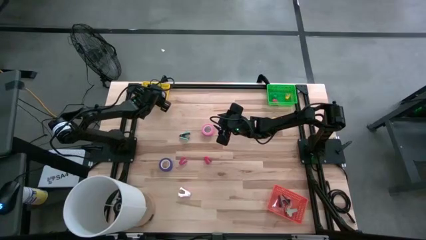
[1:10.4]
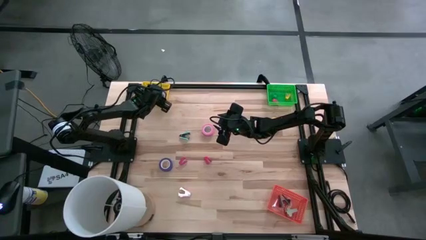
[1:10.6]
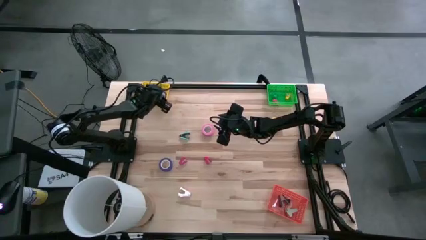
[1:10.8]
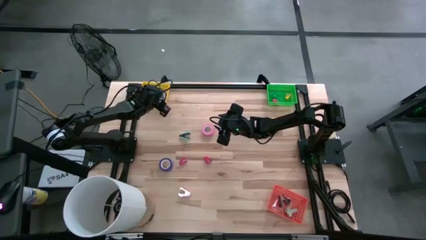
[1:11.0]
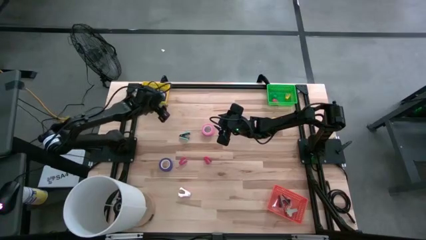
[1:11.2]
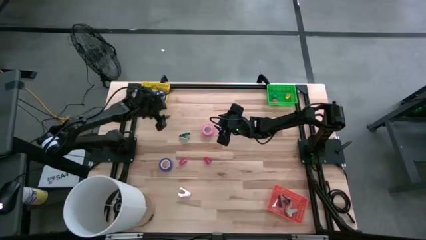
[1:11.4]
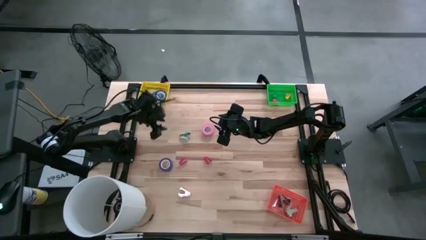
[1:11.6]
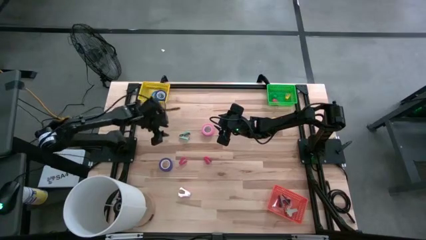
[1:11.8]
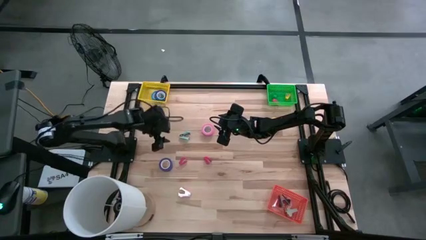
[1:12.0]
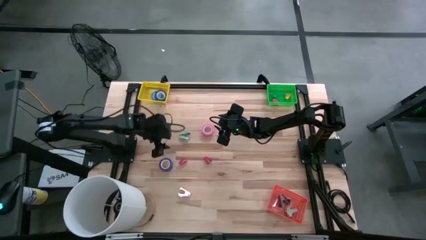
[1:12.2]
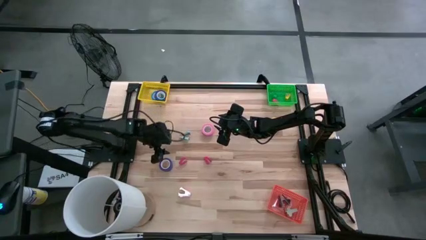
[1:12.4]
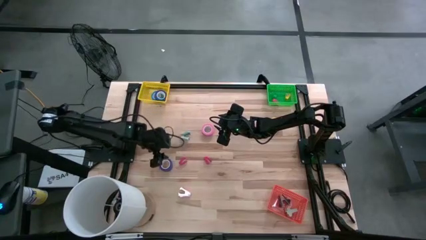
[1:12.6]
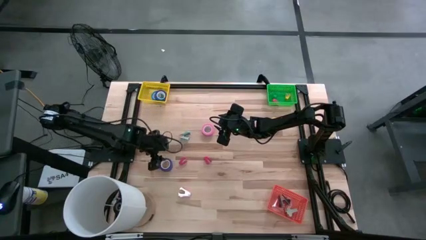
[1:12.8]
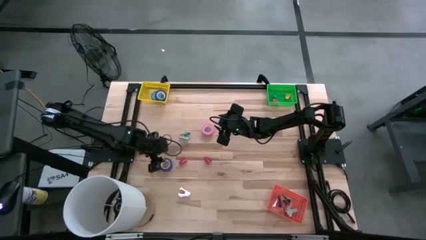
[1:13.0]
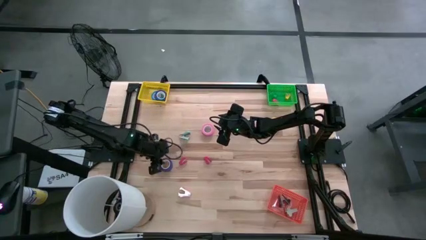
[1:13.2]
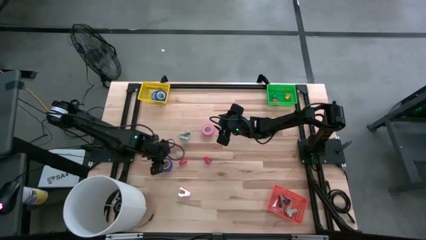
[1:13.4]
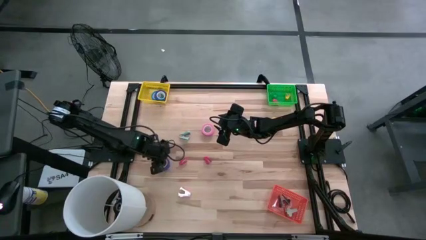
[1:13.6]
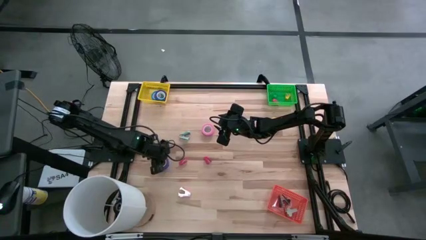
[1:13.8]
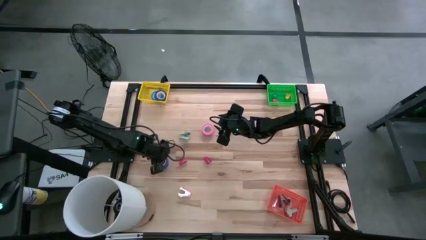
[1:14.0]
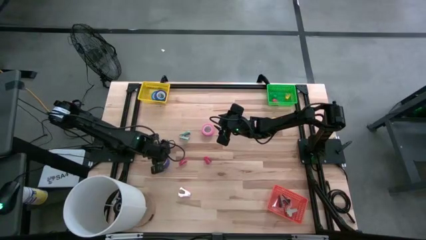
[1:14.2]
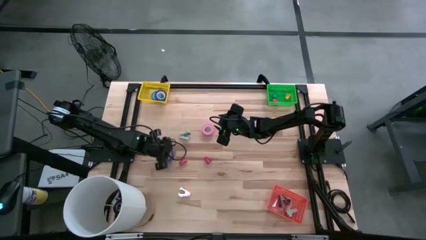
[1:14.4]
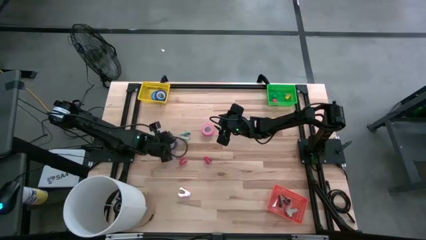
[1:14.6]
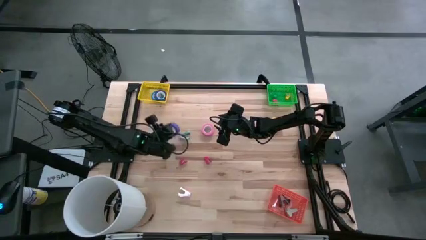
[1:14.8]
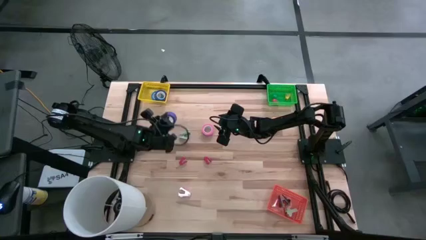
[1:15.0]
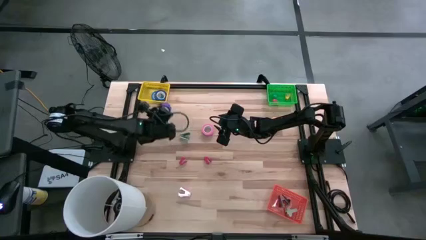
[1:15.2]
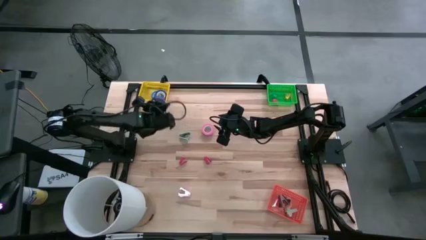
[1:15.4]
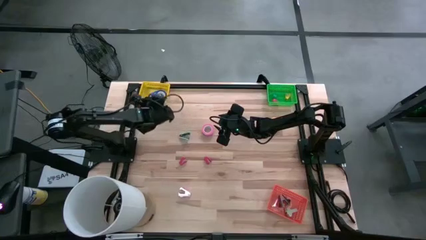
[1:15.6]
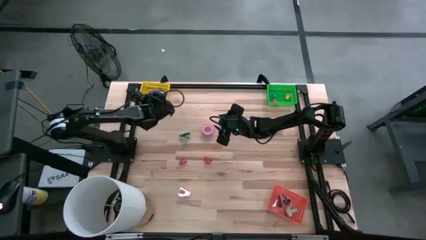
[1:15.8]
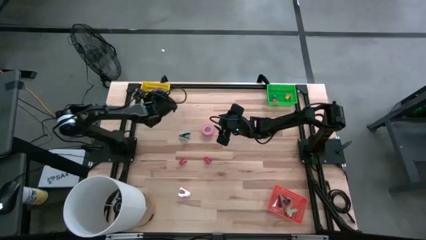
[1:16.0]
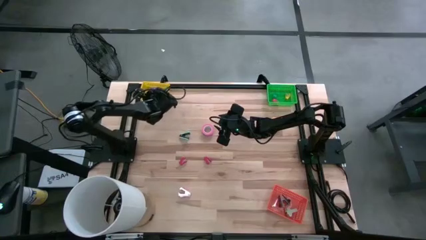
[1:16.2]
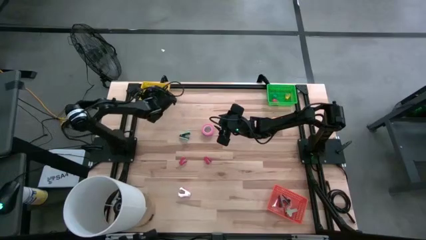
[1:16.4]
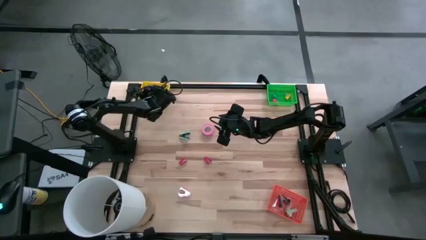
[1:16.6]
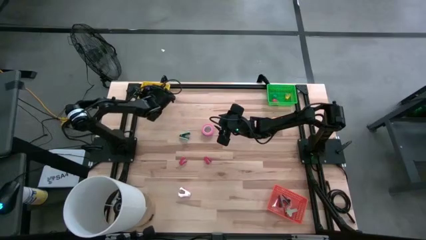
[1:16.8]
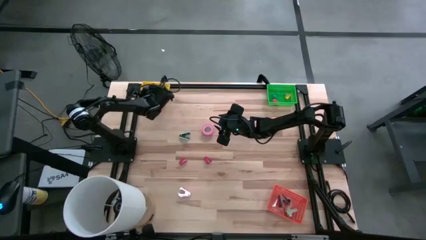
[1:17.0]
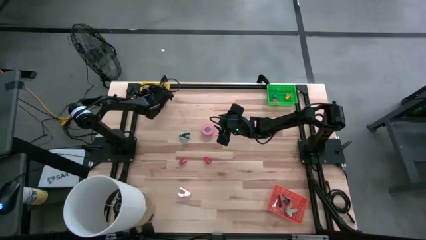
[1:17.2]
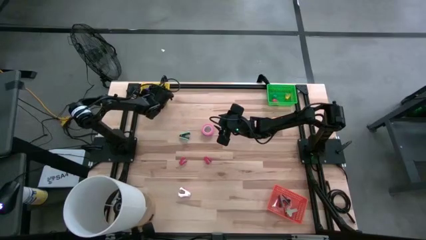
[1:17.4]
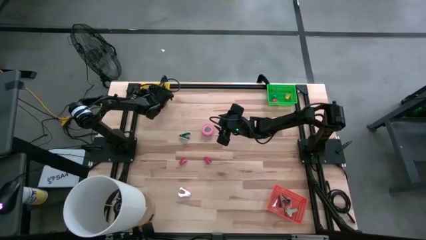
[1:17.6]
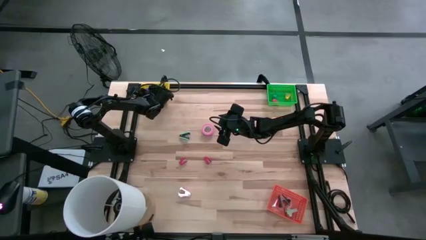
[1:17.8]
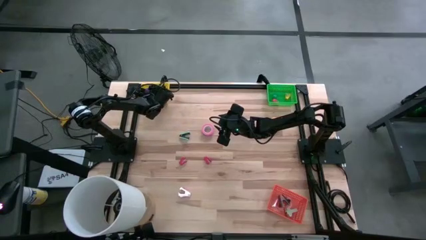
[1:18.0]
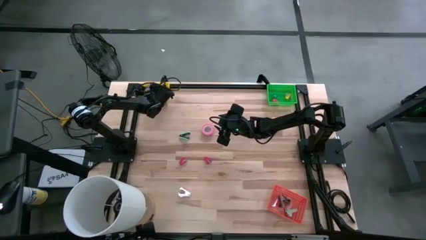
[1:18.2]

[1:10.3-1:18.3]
Task: Pick and place Stapler, Stapler remover, tape
Put the violet tape into the yellow bin

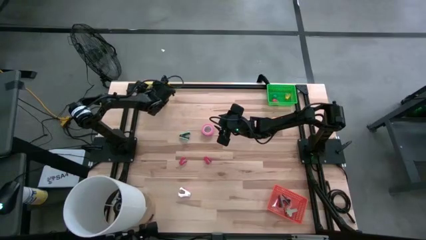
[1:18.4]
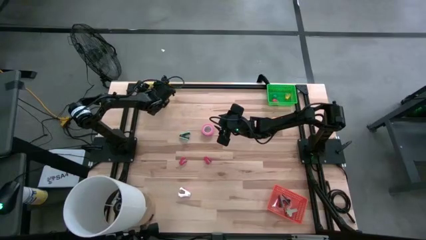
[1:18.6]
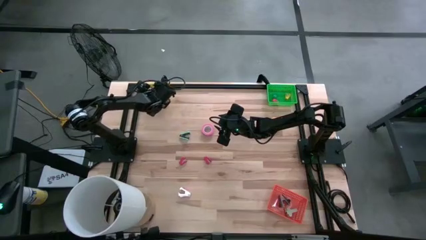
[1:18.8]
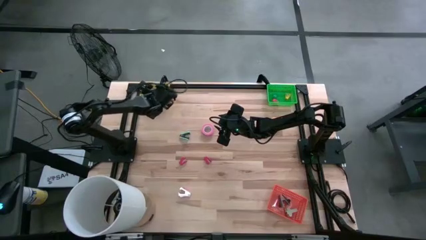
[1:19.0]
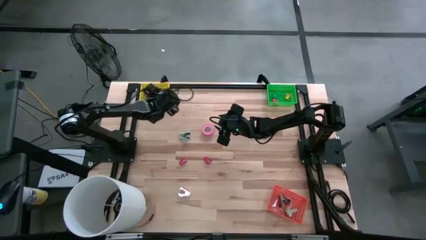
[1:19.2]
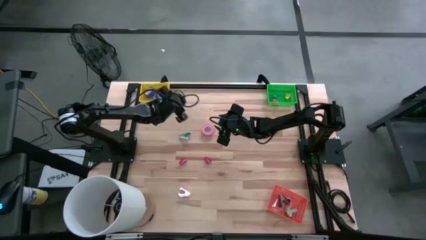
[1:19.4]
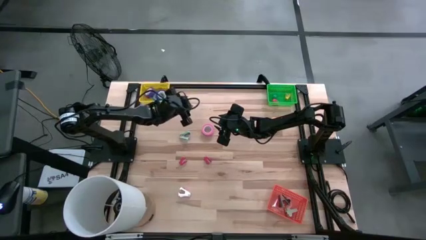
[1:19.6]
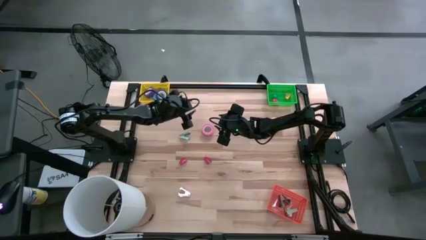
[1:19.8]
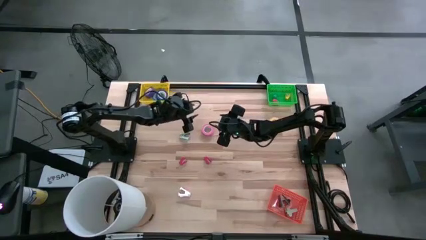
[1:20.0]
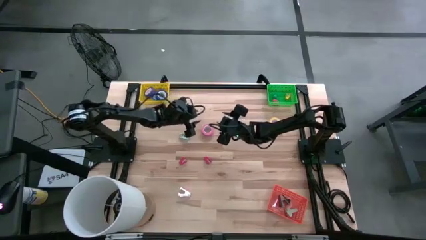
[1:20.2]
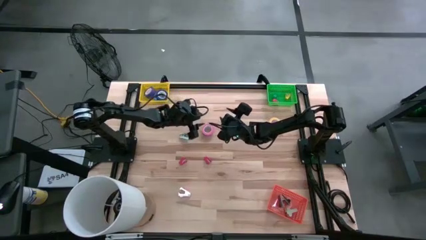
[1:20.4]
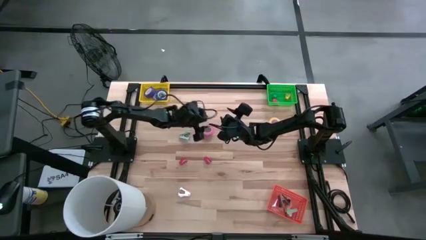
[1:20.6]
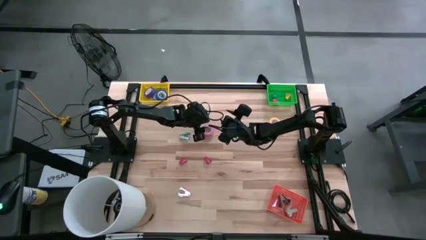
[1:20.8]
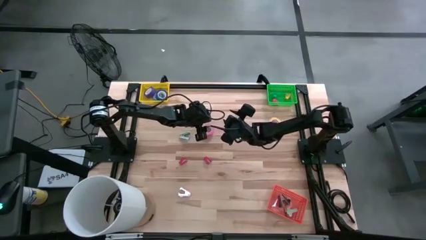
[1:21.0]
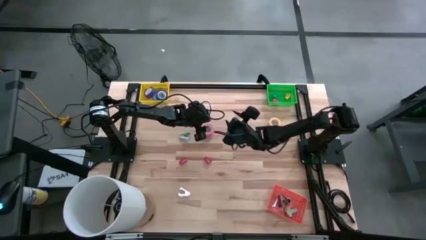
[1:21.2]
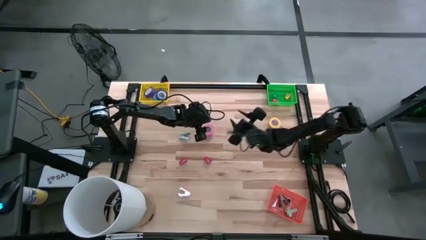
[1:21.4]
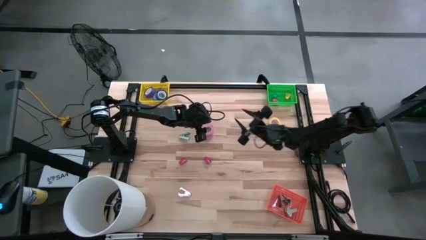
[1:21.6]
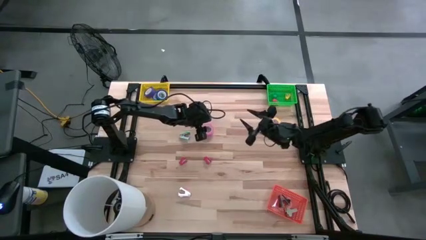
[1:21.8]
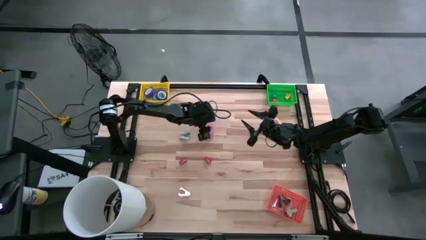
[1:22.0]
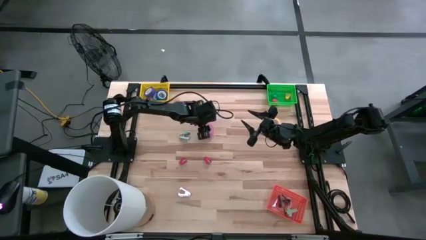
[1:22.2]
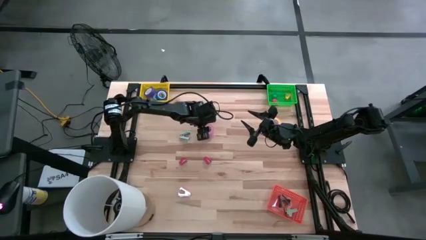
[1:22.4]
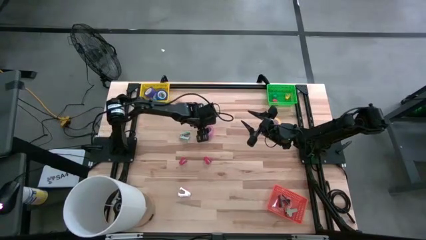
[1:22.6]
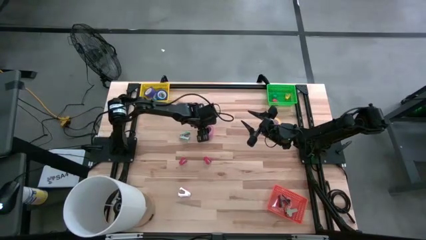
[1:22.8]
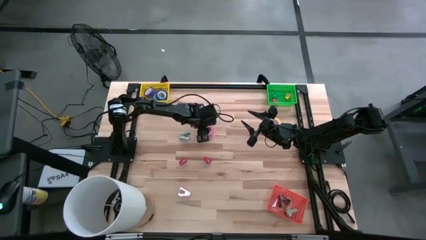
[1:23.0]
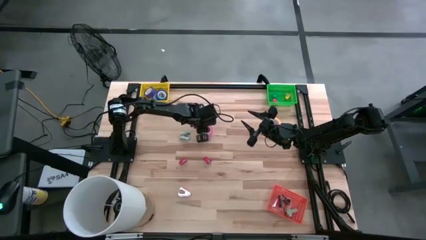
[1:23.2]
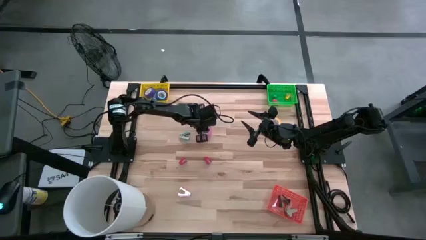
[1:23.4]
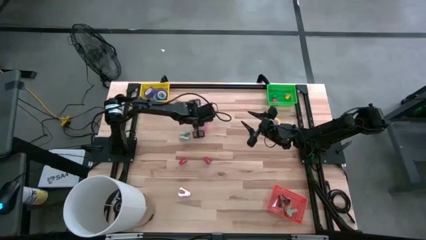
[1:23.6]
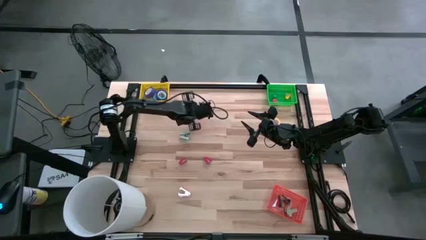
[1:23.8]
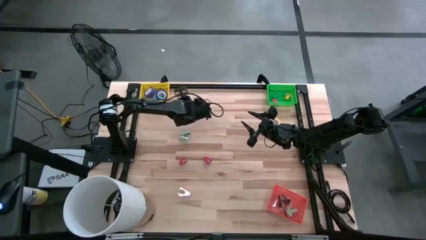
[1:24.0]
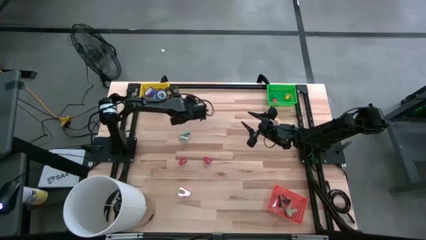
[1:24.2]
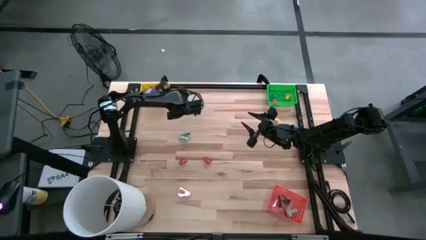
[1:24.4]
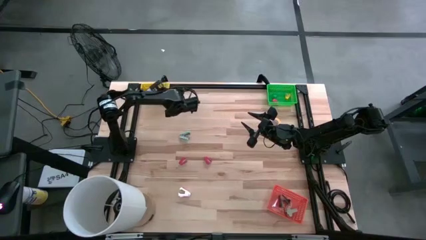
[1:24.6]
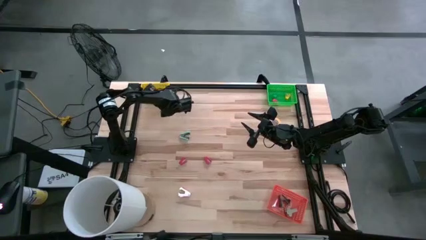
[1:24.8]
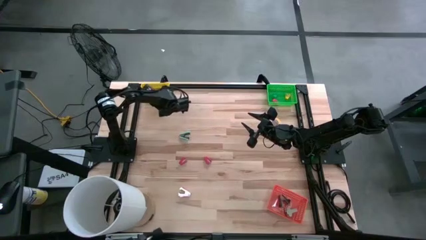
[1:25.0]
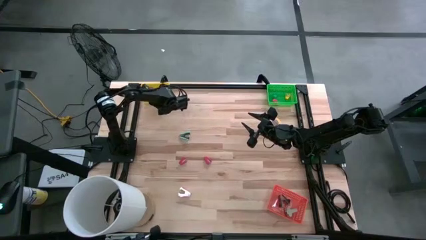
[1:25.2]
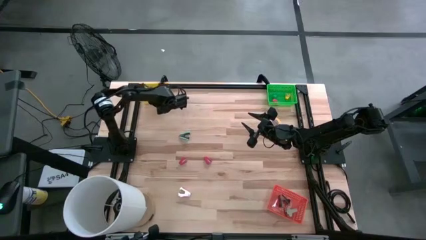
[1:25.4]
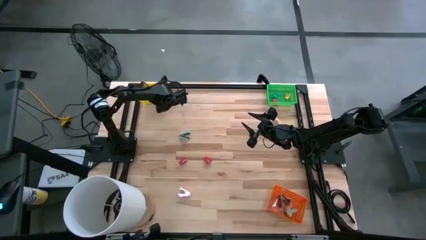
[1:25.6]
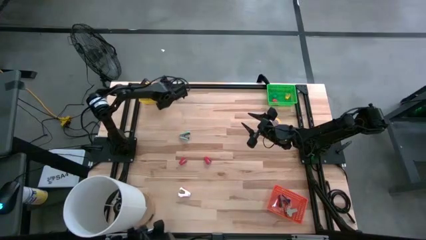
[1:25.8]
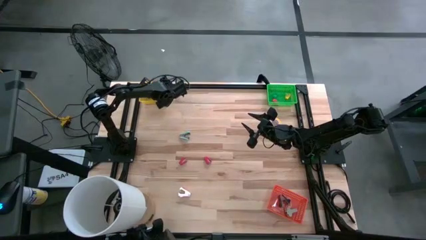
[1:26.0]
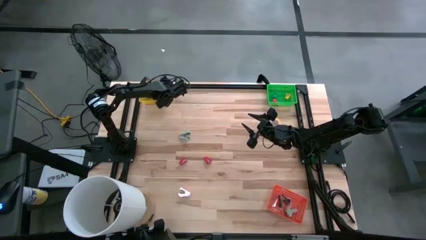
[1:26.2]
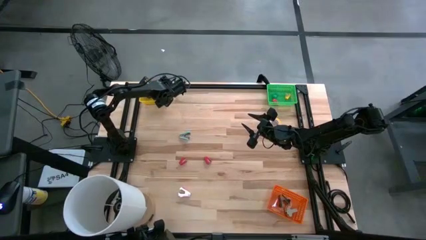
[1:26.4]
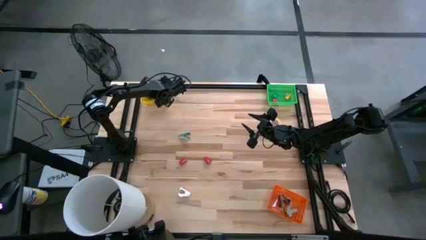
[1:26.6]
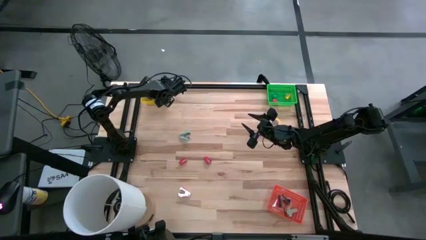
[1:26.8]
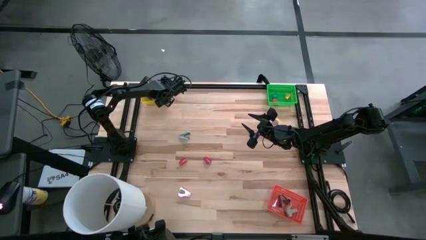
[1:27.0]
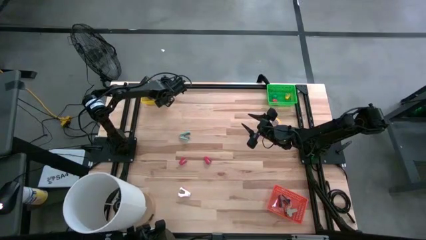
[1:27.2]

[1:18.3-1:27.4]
Put the pink tape into the yellow bin
